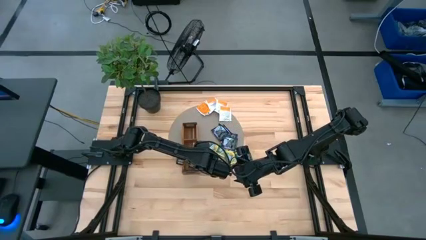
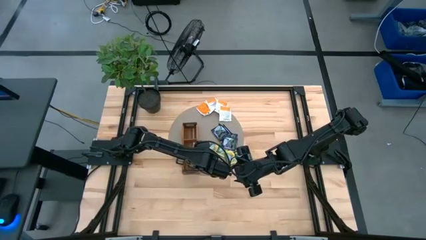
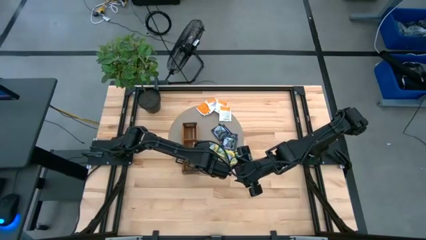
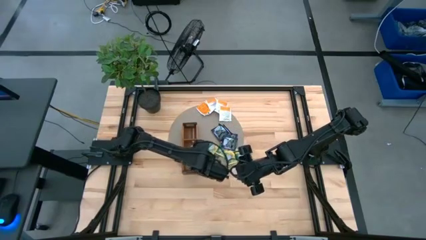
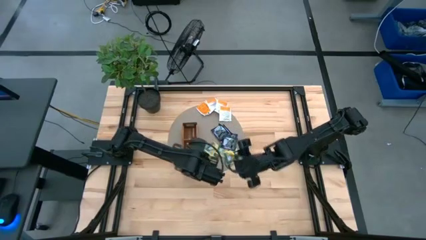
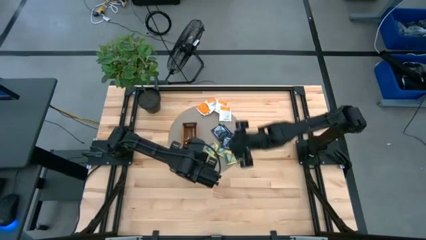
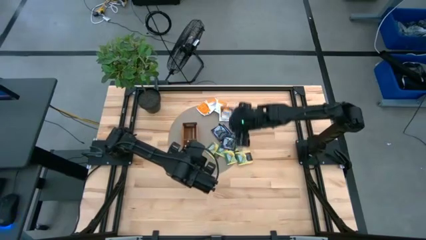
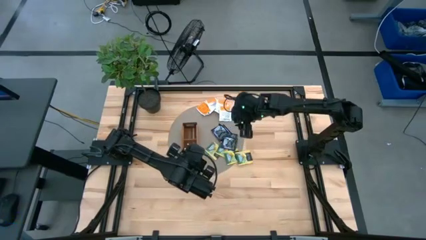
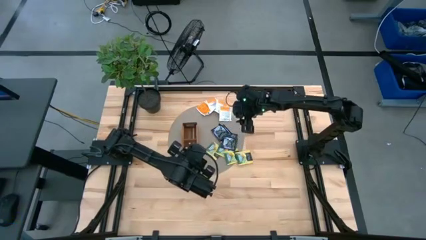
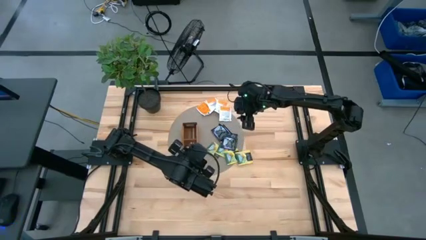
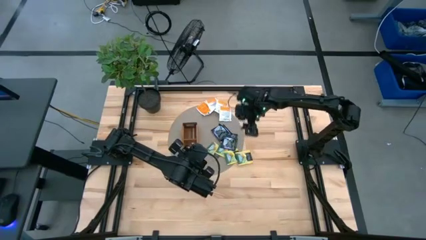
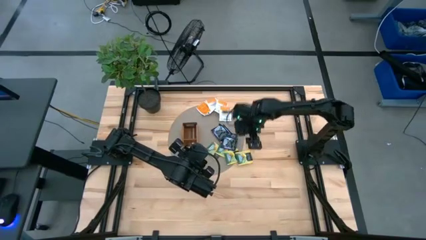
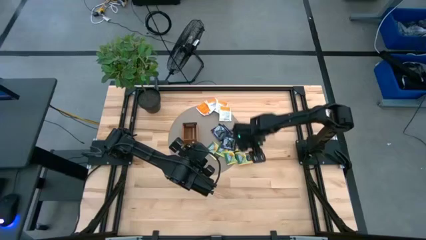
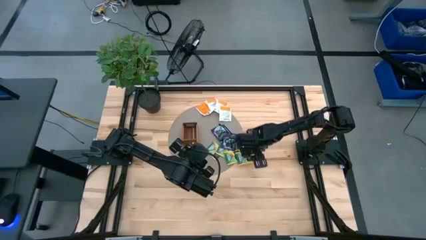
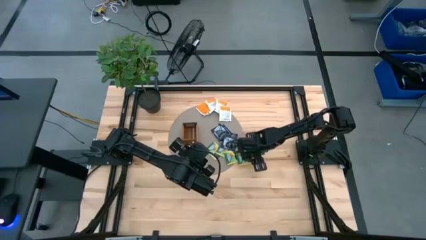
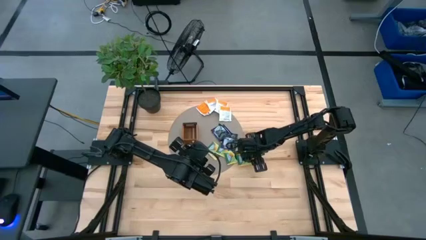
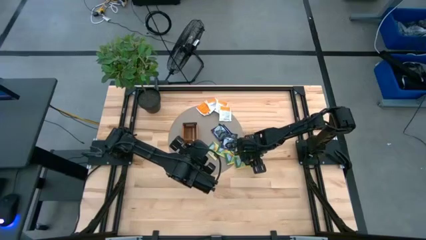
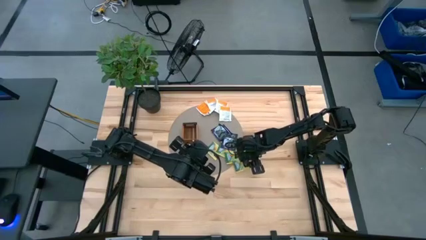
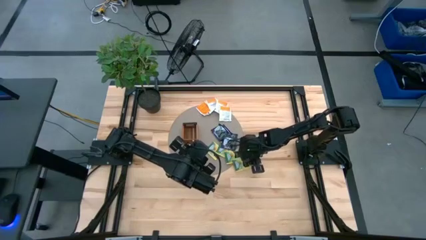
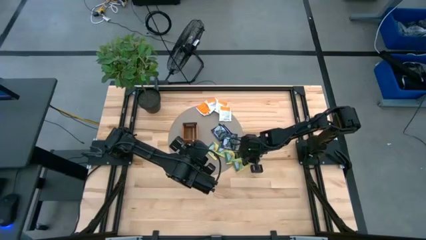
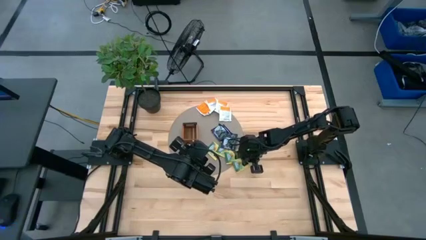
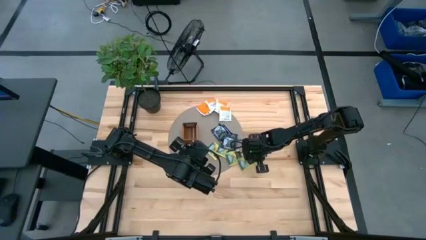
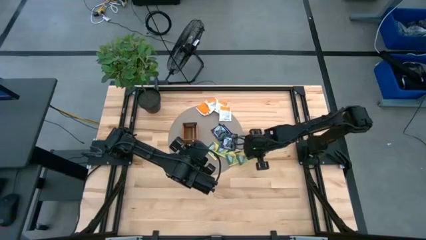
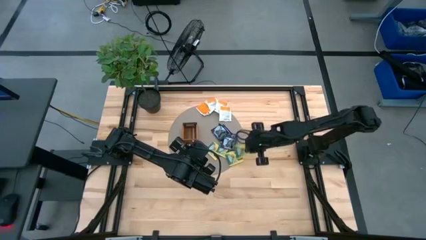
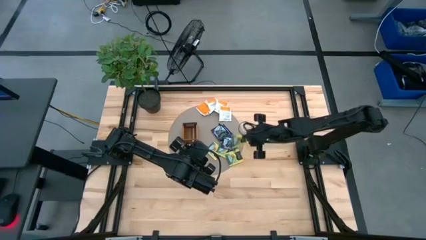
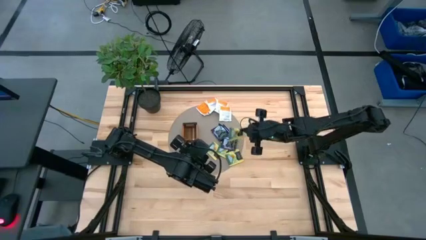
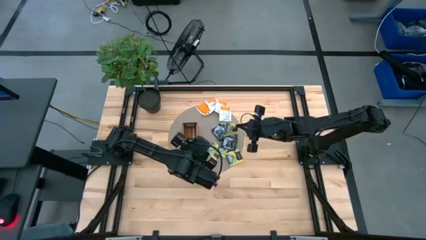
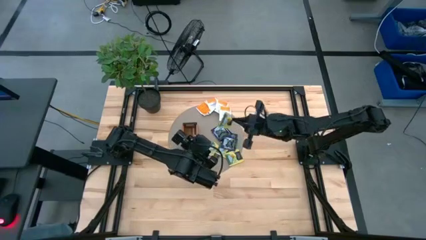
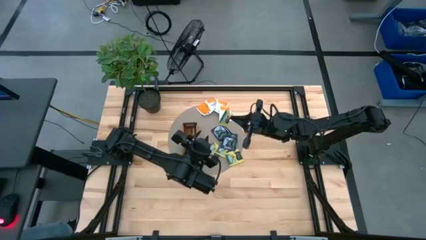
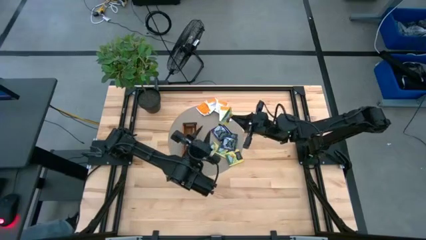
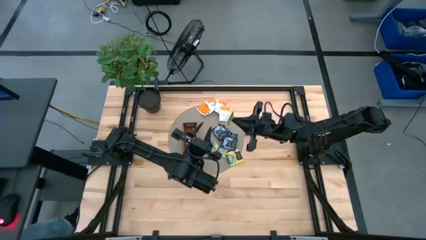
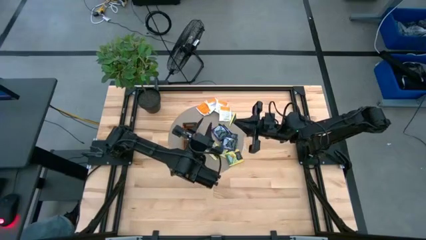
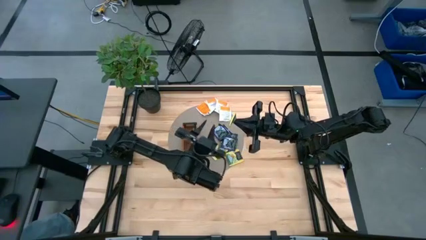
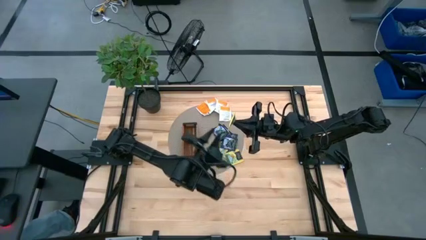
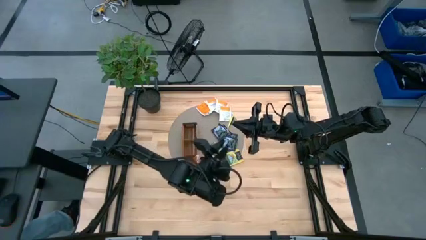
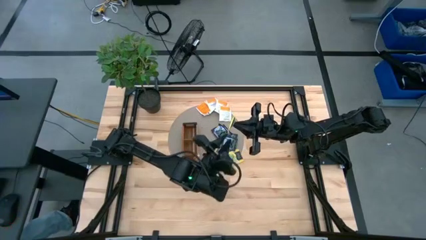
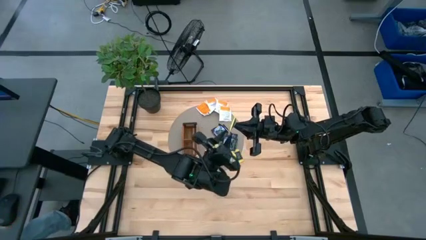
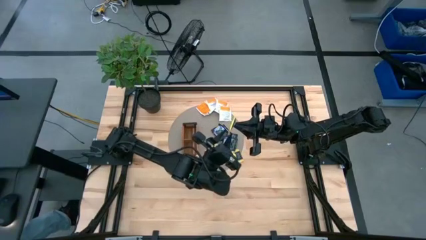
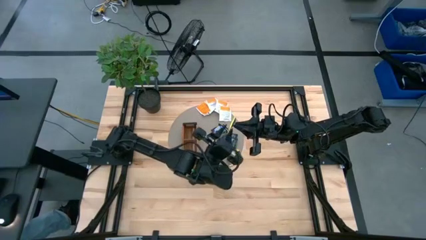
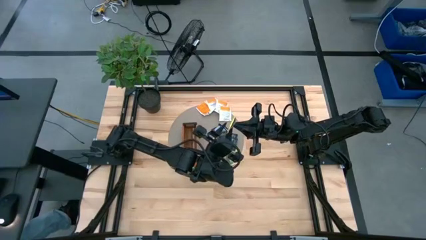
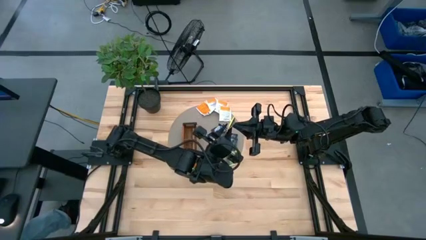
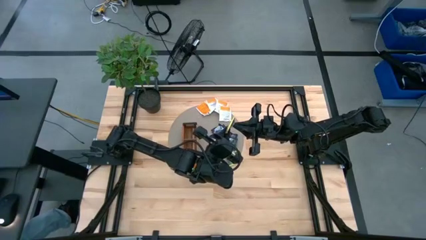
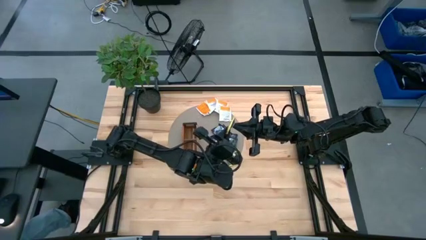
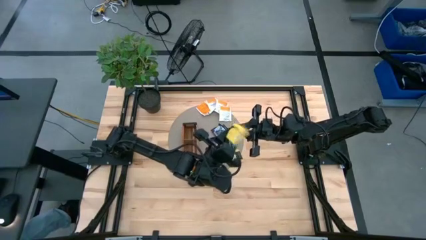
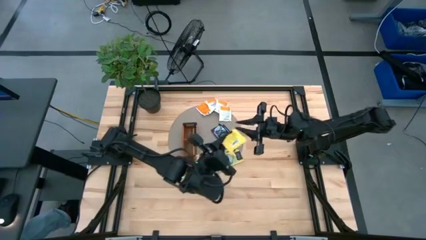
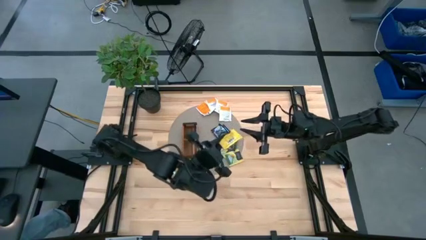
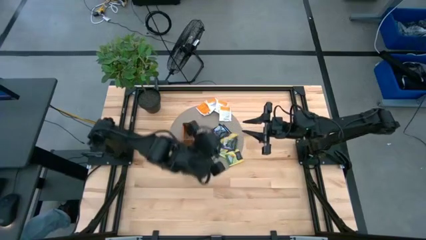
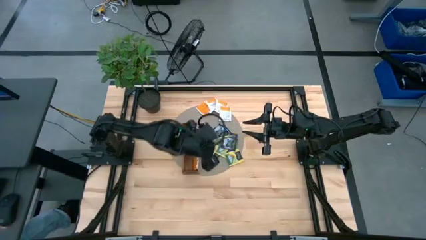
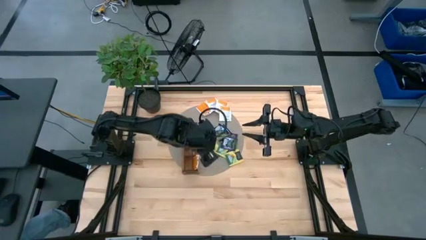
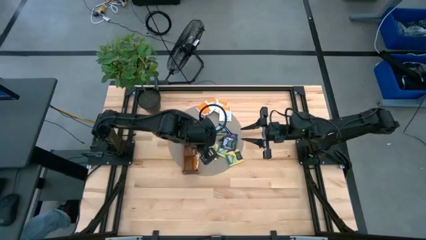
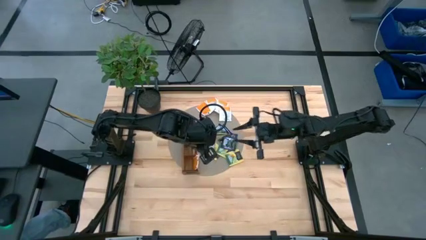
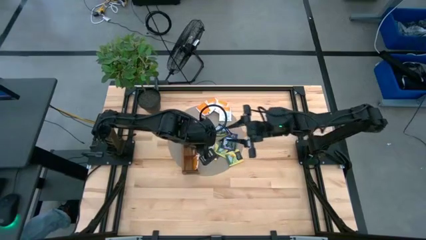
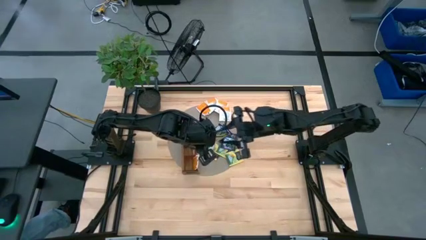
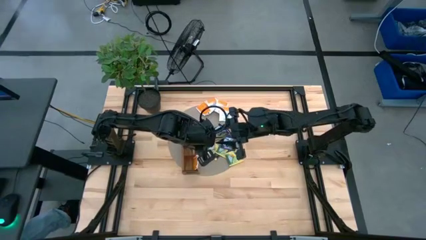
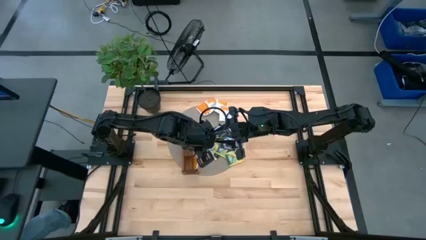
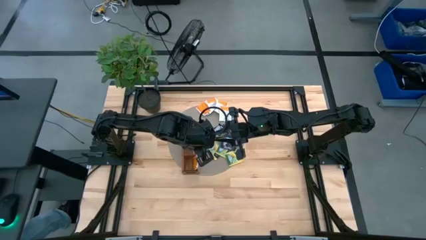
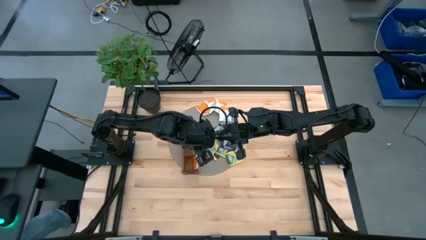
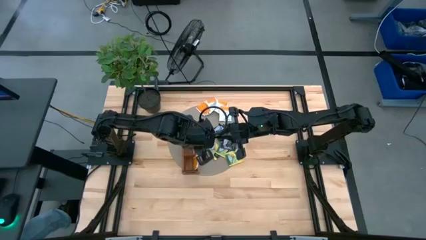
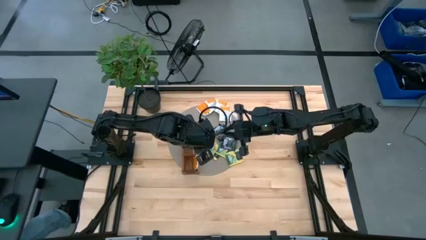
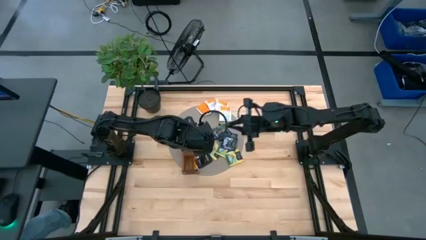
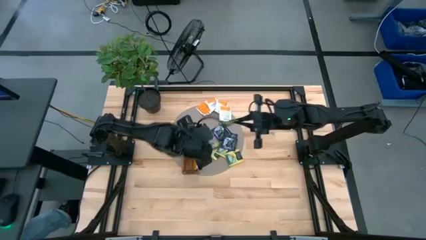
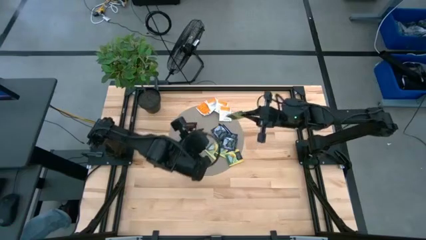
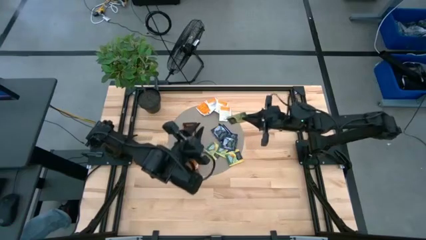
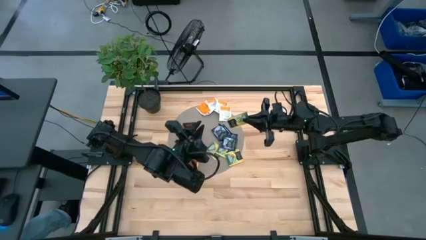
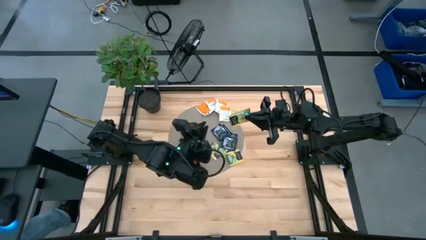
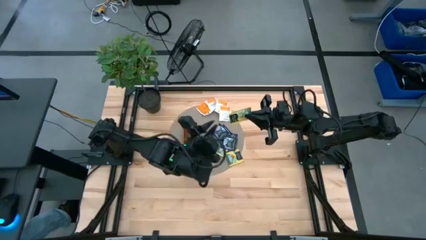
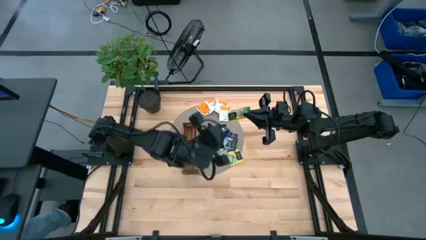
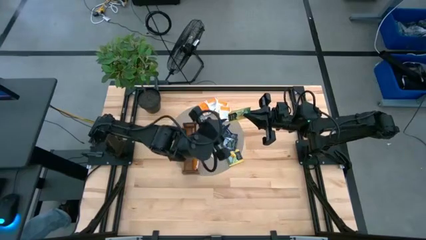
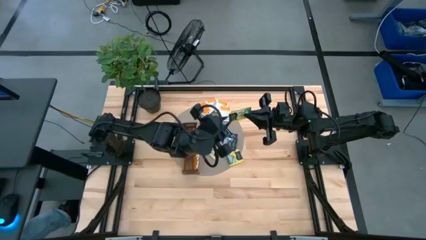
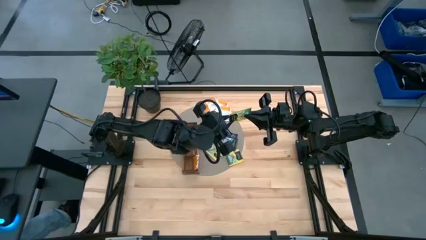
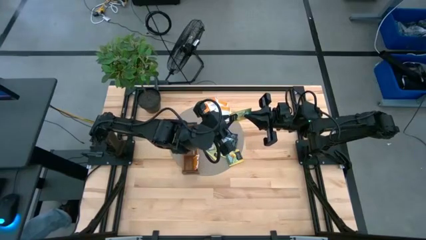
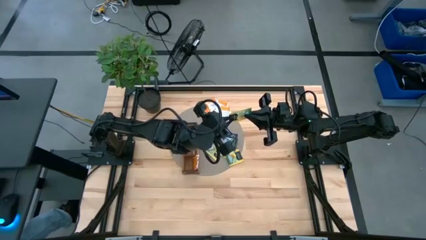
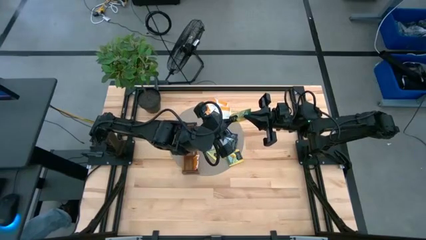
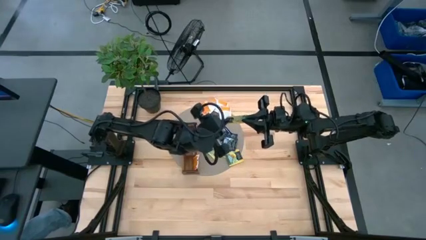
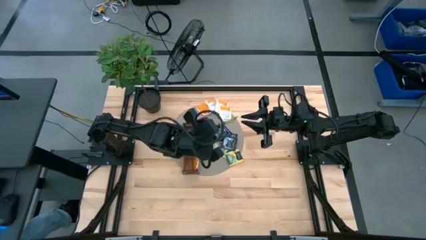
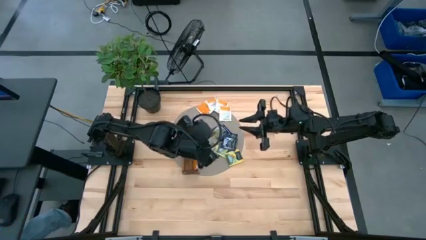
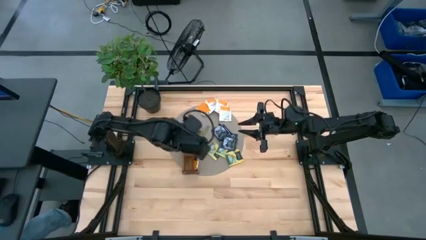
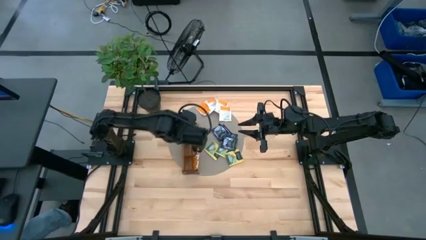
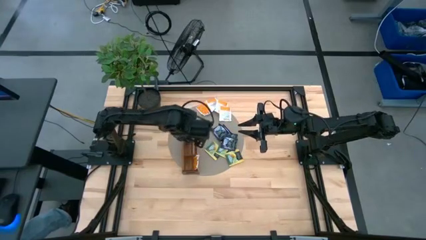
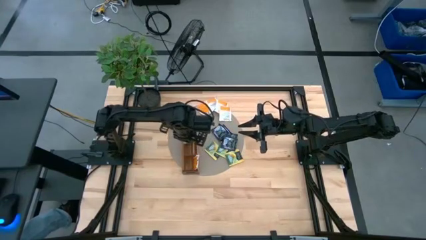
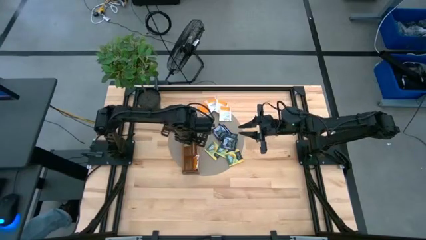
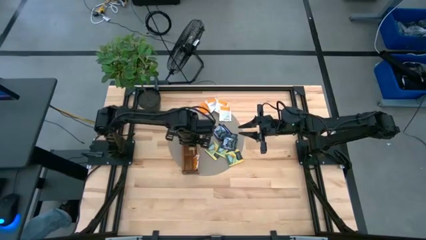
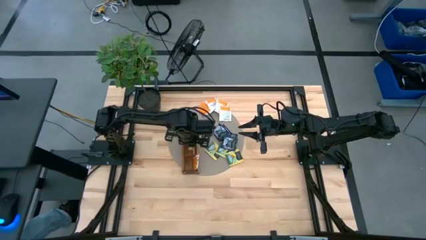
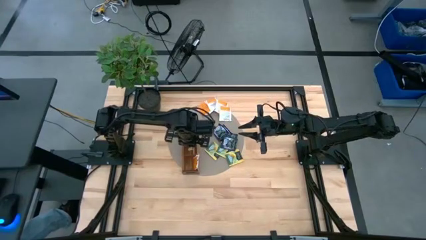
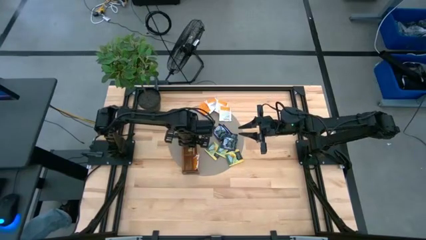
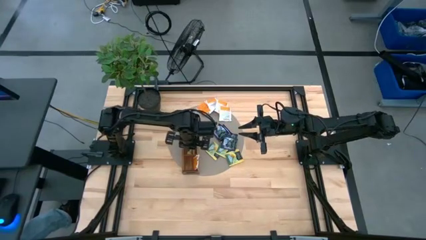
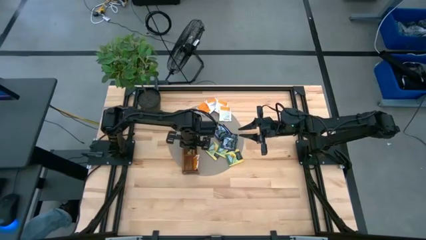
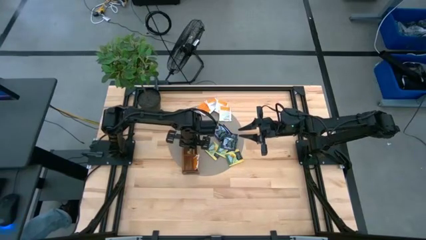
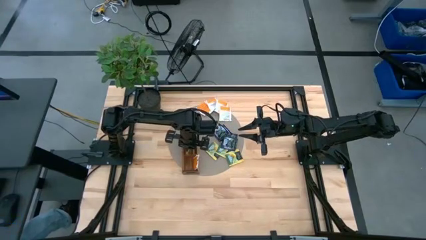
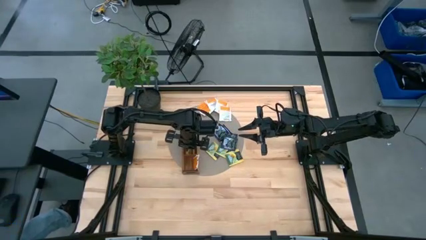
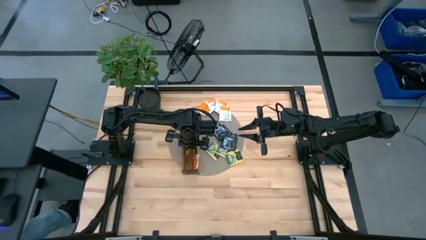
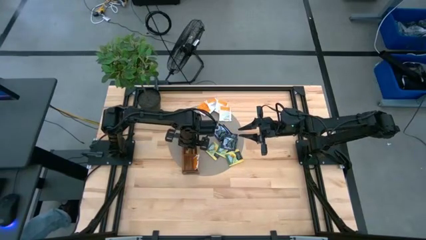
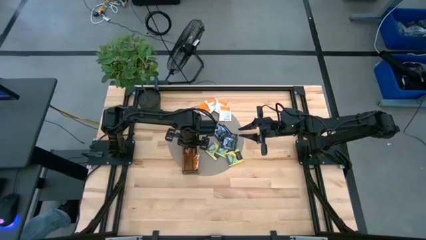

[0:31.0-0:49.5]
Task: Pick & Place Tea
Put the yellow tea bag into the middle section of the wooden organizer
